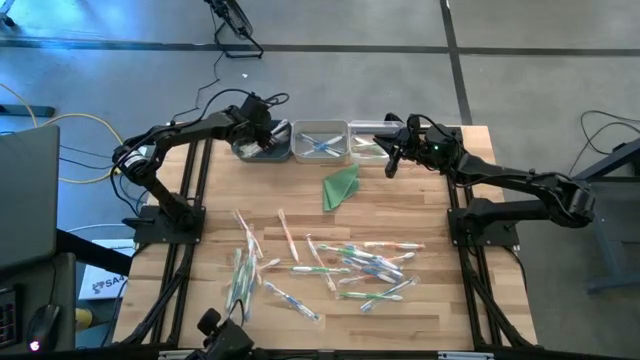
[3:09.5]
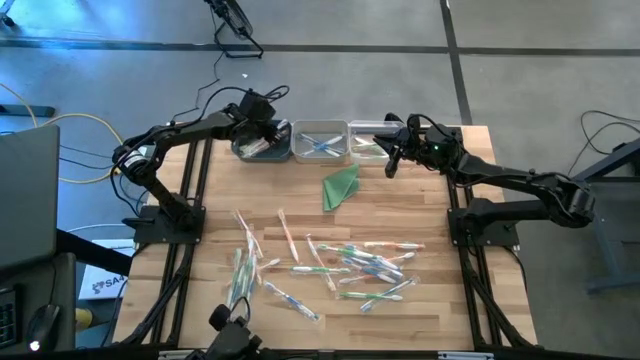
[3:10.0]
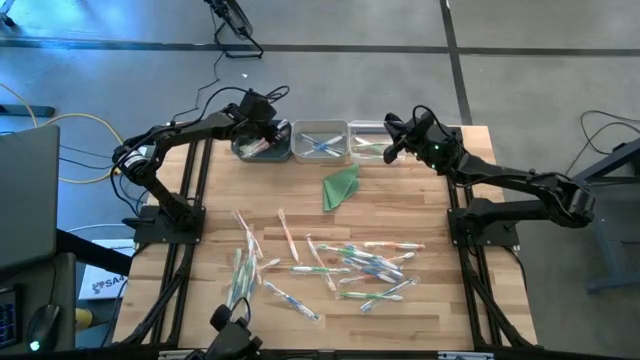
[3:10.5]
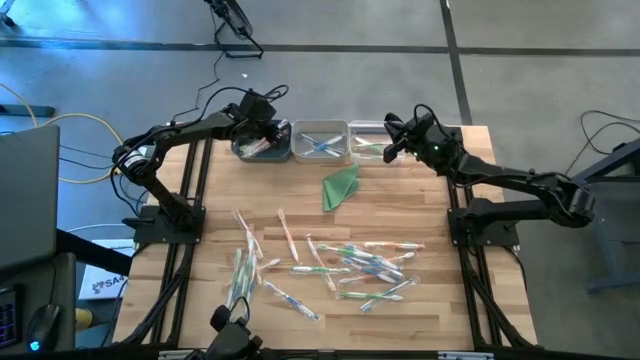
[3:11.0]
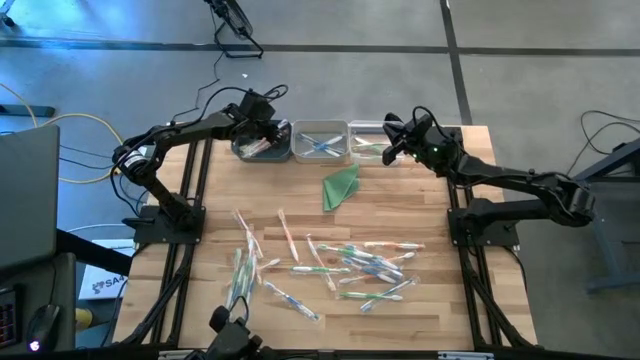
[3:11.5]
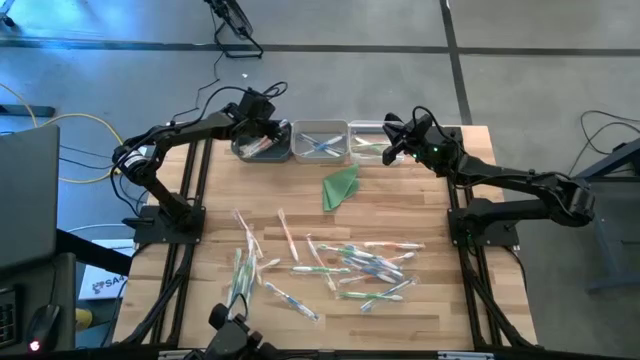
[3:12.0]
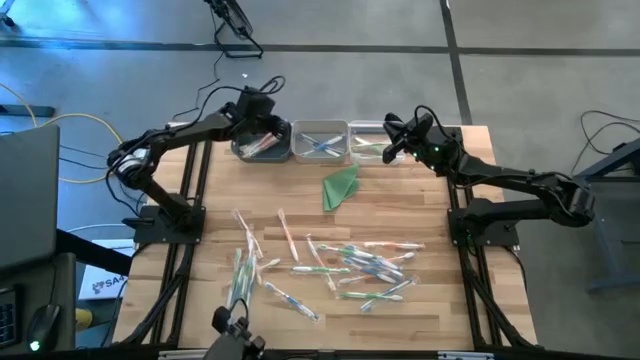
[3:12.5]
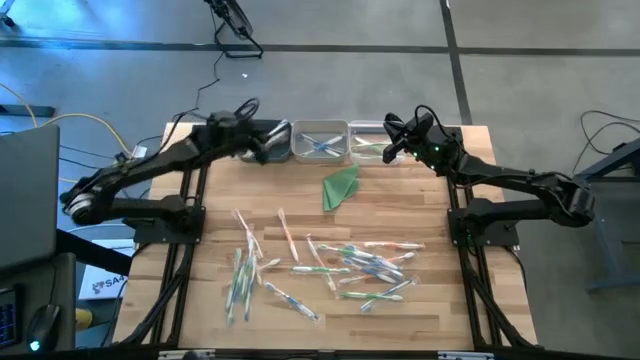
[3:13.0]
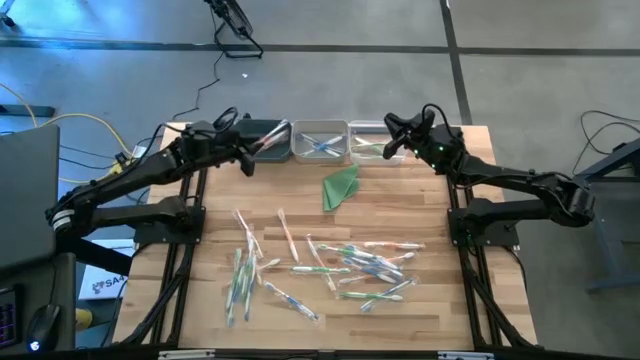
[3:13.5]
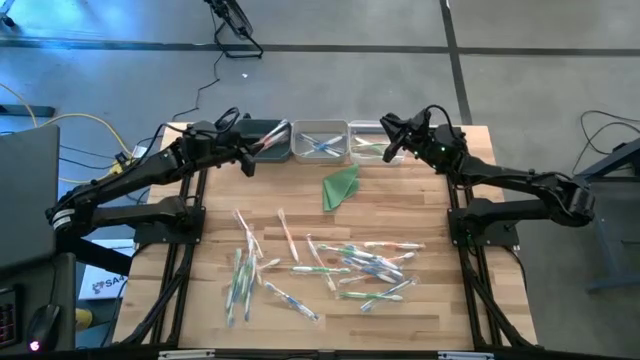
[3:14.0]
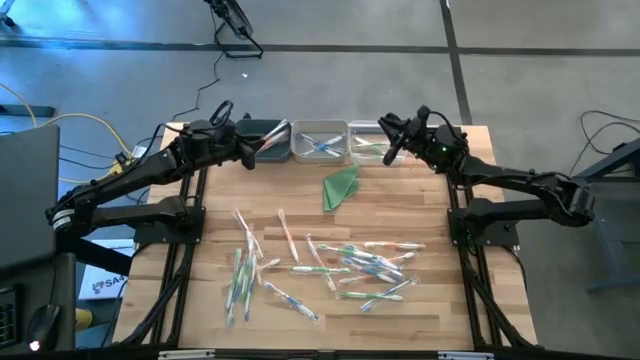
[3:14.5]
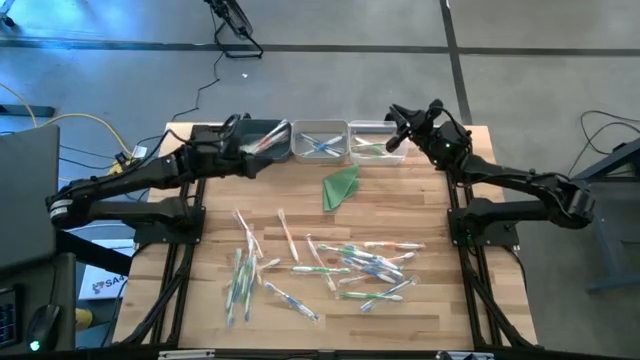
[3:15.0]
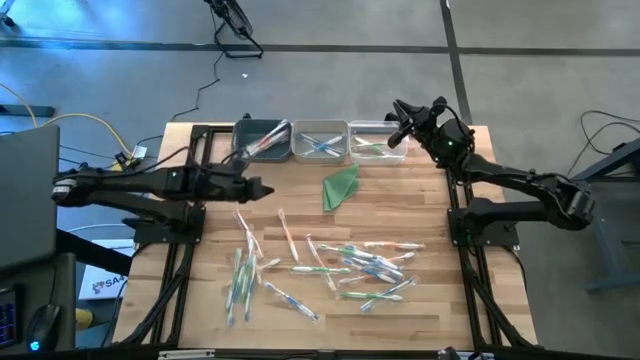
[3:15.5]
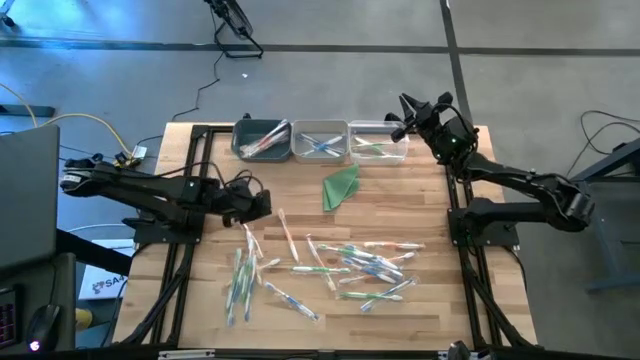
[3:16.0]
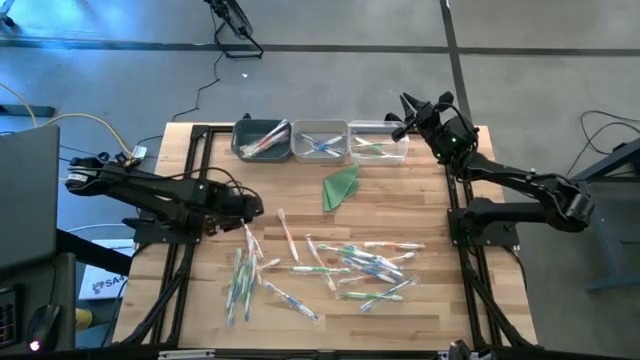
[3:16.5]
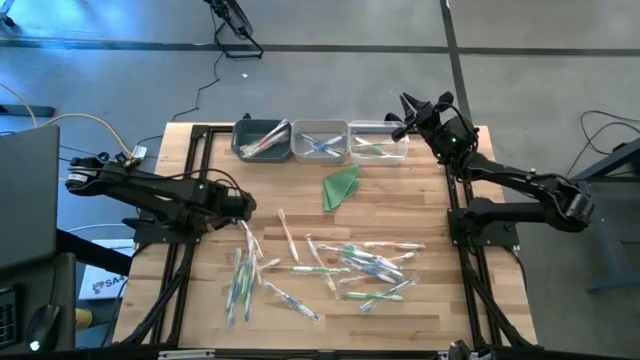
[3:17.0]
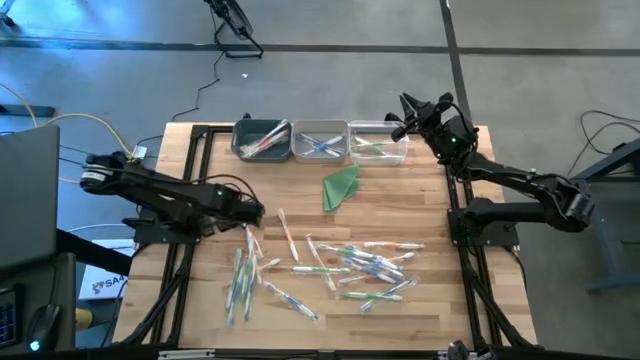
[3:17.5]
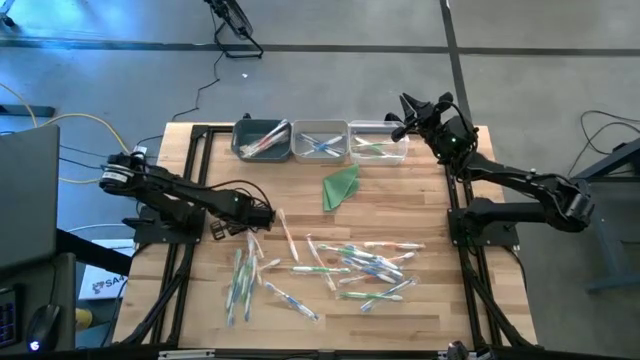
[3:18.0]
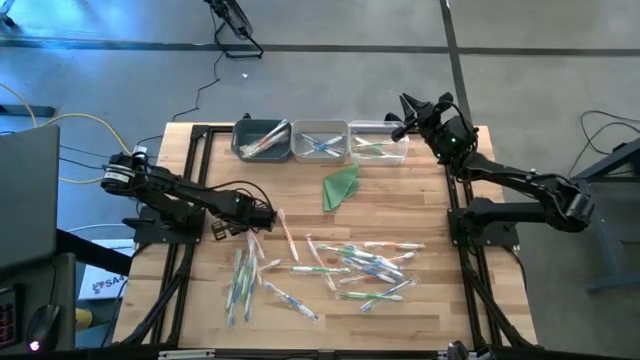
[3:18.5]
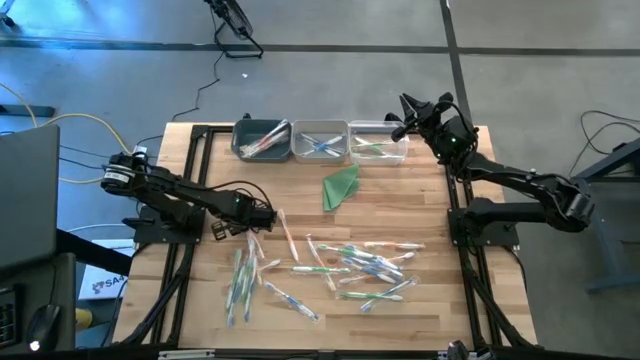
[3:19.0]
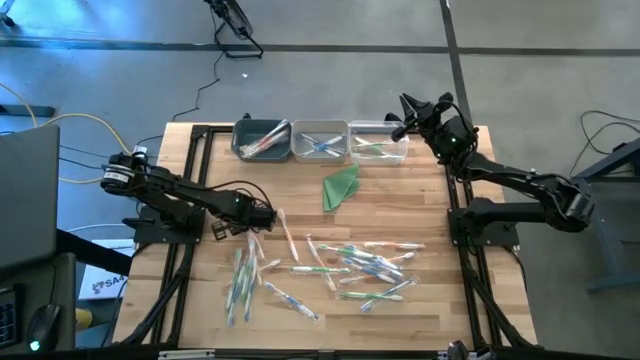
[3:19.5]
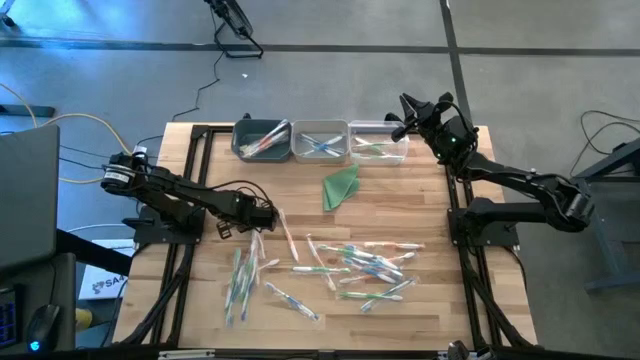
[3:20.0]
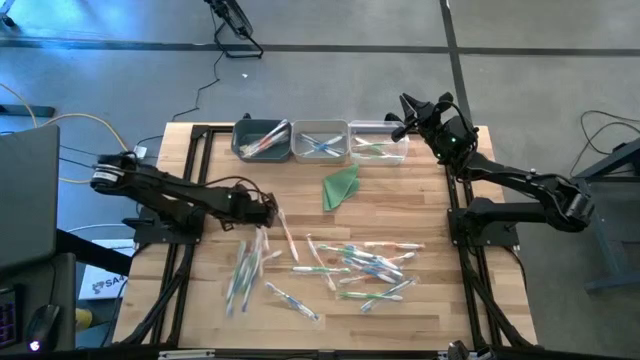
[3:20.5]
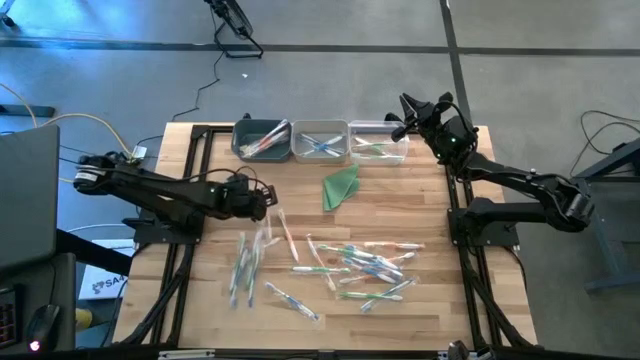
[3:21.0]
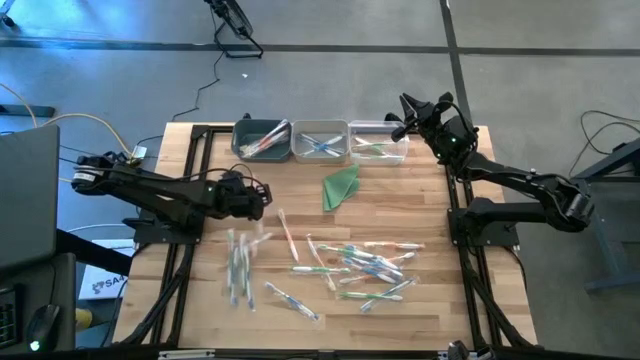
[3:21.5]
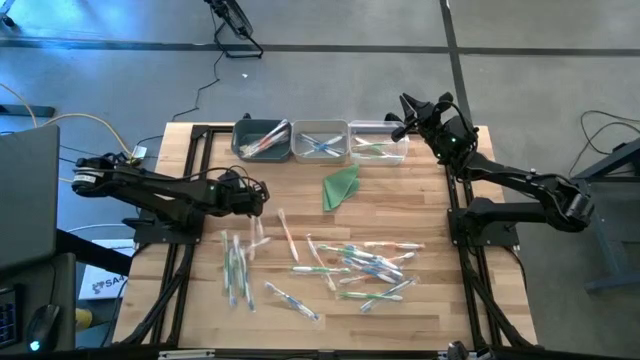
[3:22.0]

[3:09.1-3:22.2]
Task: Pick & Place Toothbrushes
Put the orange toothbrush into the dark blue bin

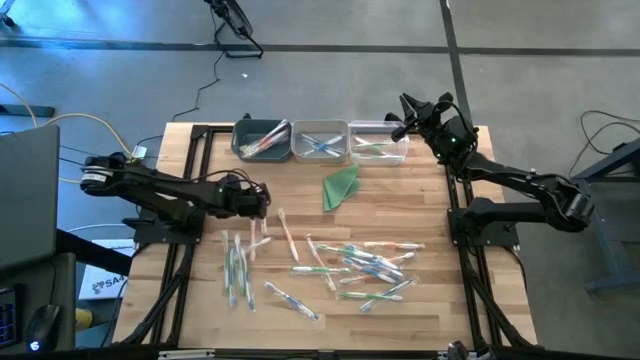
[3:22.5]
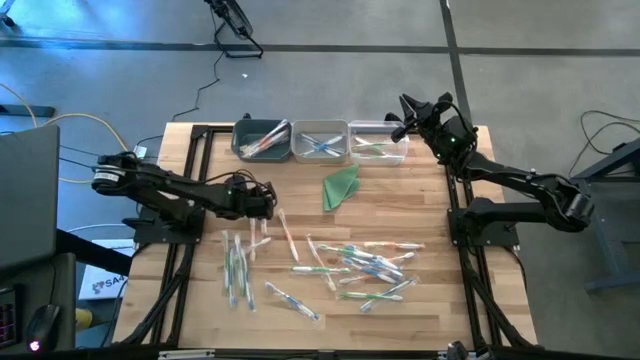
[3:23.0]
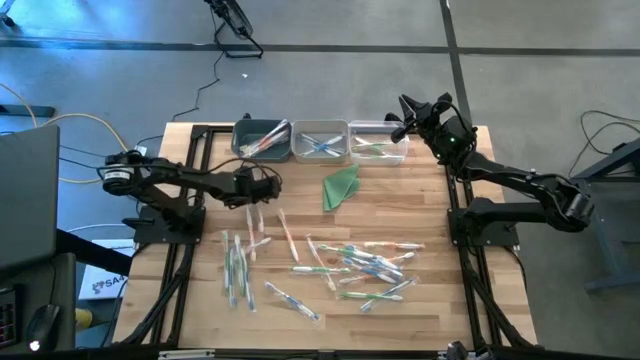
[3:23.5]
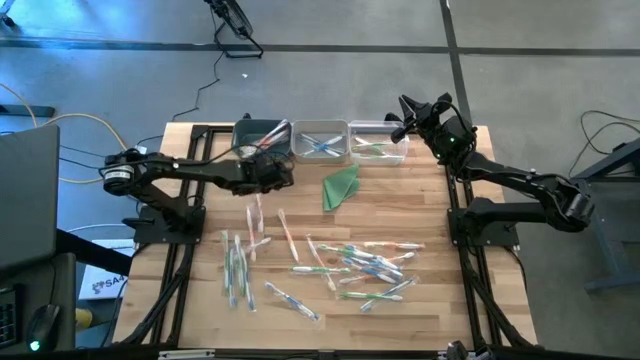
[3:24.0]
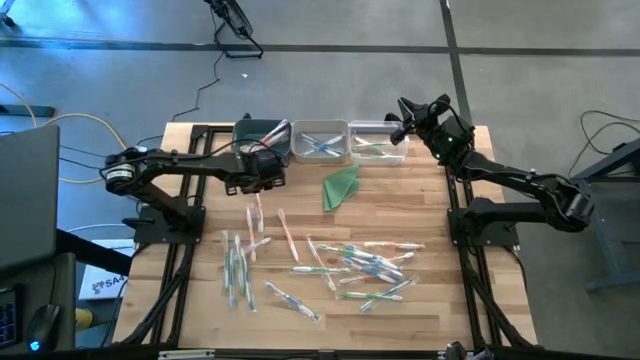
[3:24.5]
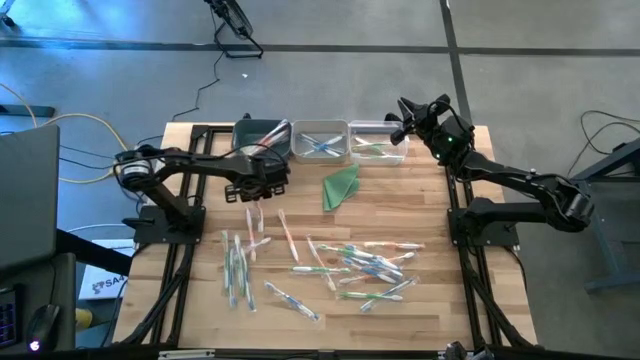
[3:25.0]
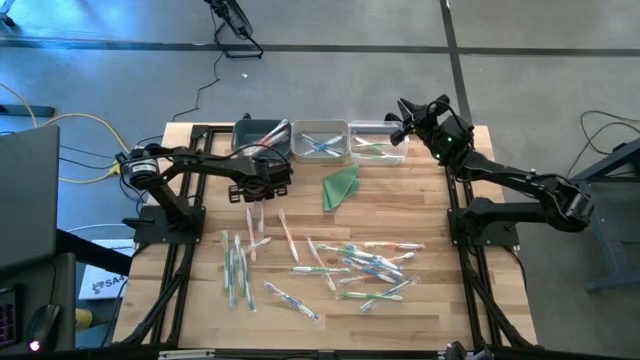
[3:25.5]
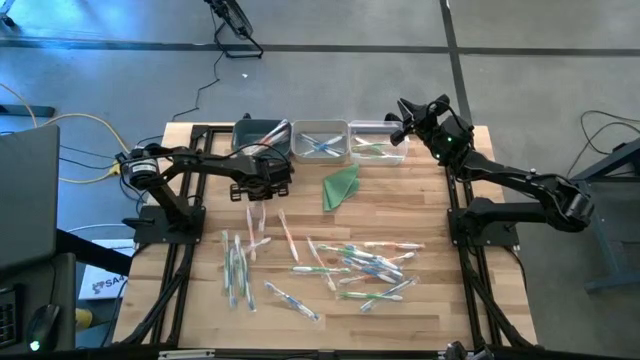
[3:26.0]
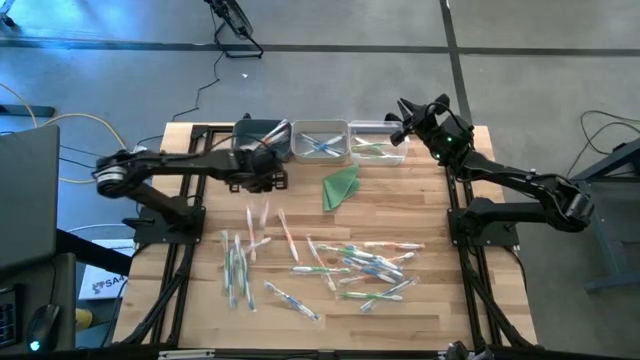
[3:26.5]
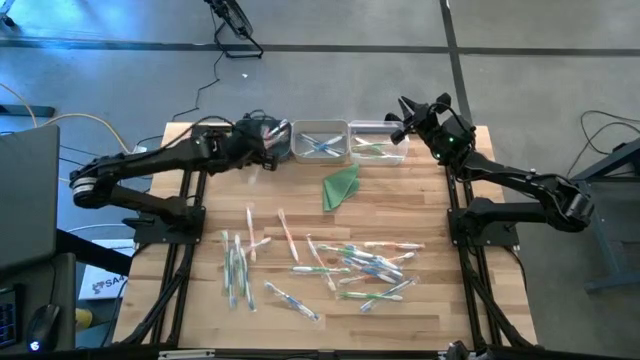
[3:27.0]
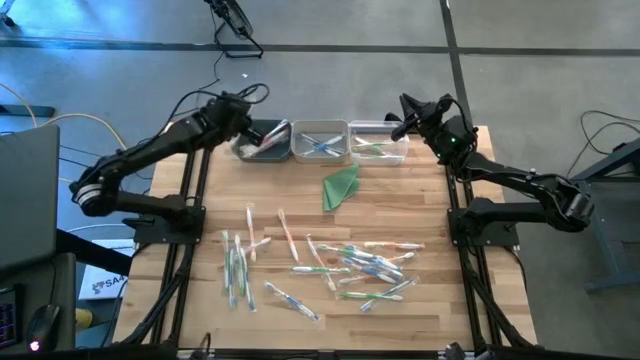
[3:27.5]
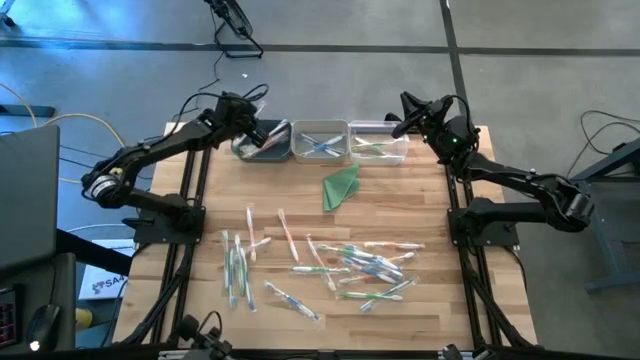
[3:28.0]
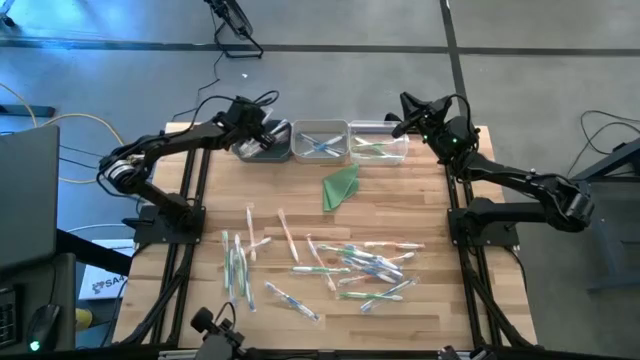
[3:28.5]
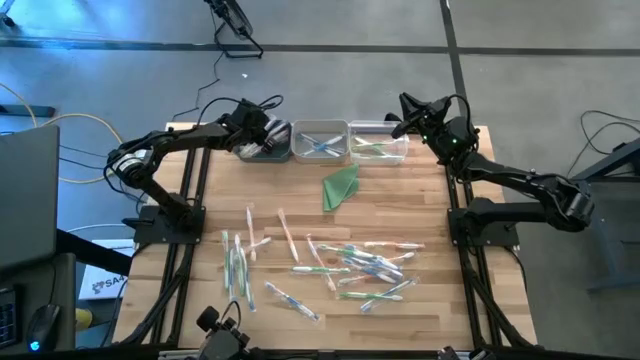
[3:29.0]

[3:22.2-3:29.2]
Put the orange toothbrush into the dark blue bin

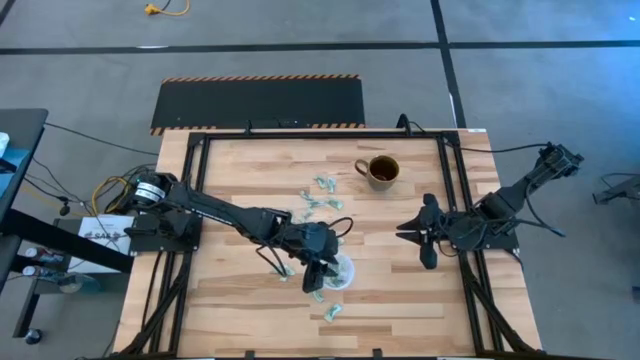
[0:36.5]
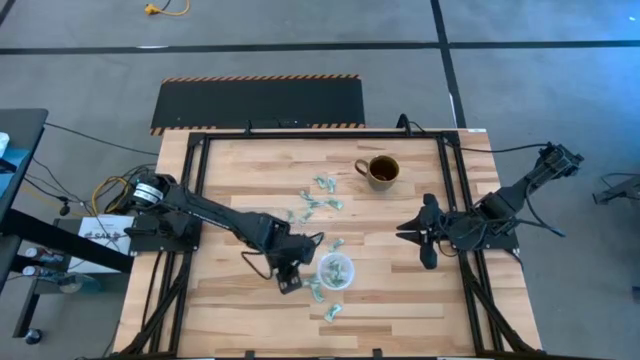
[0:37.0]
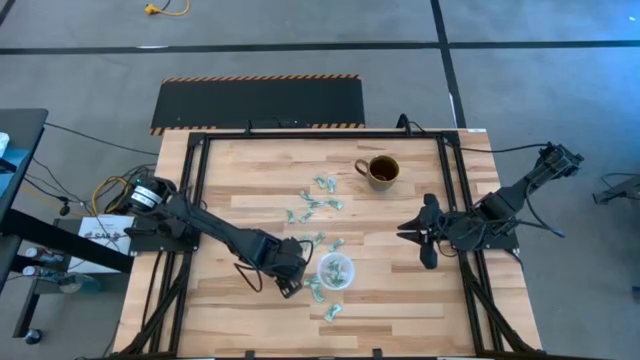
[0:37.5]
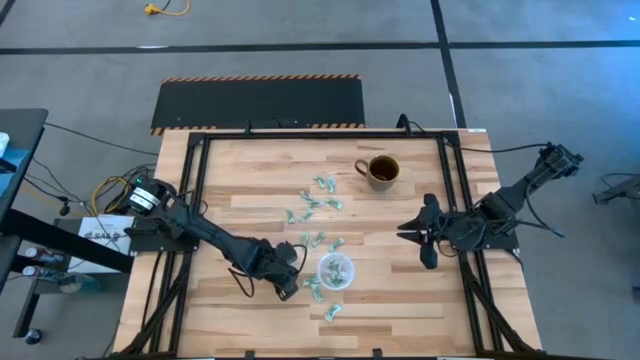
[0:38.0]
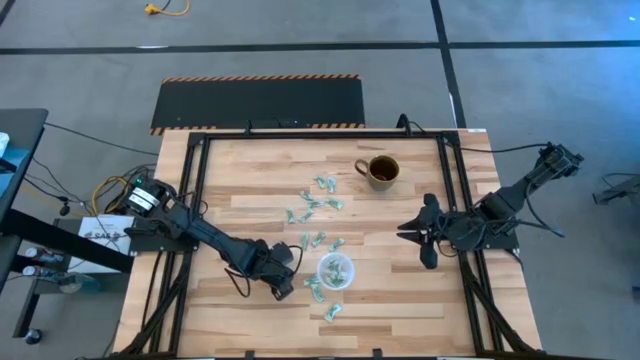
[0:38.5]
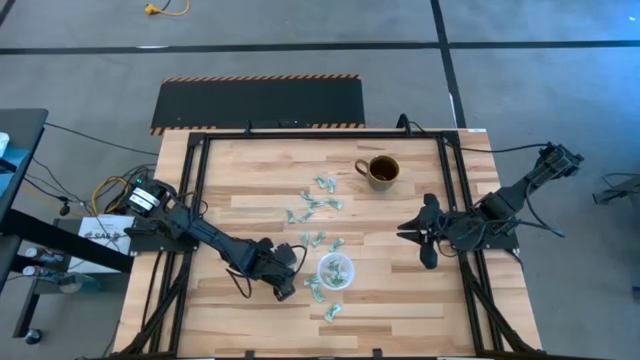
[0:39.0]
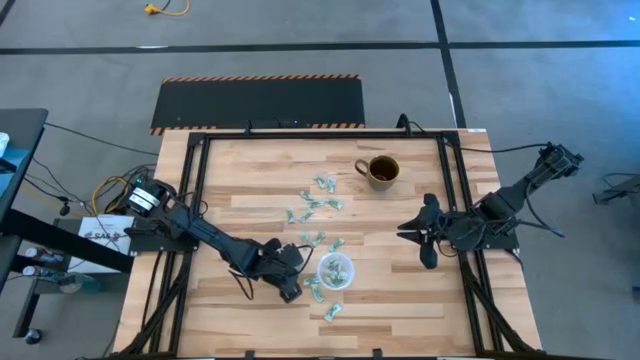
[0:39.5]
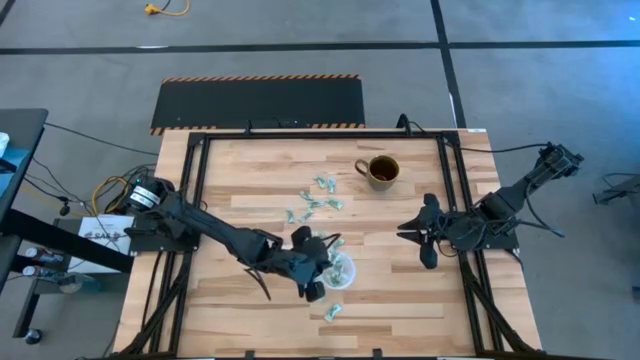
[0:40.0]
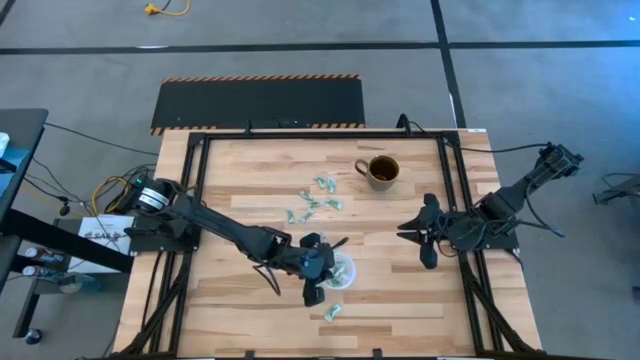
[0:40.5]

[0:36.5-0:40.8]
Task: Pick and place Stevia / Truvia into bins
Put the green stevia packet into the transparent container
